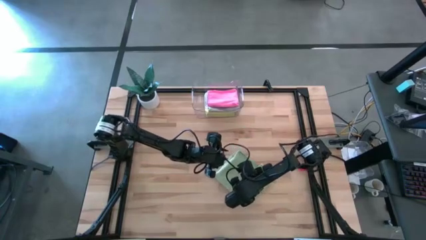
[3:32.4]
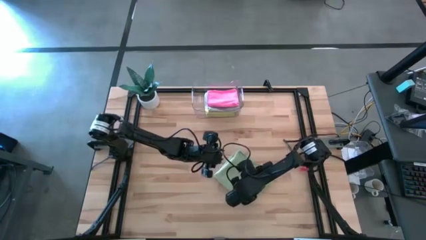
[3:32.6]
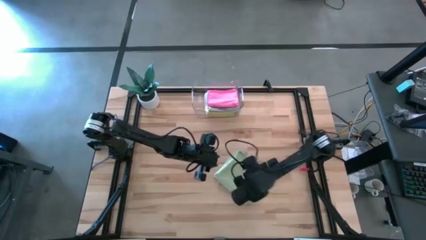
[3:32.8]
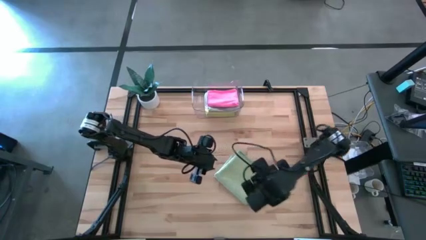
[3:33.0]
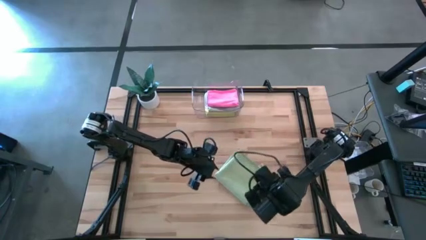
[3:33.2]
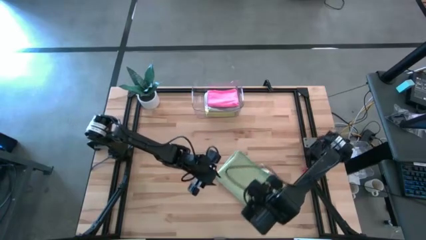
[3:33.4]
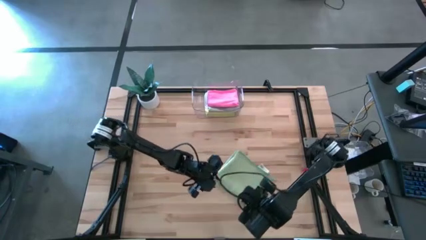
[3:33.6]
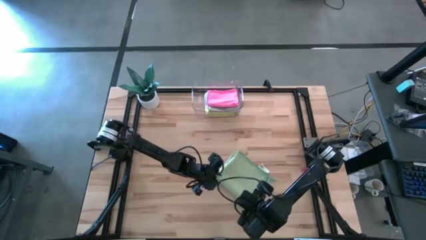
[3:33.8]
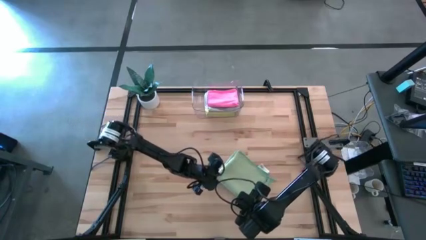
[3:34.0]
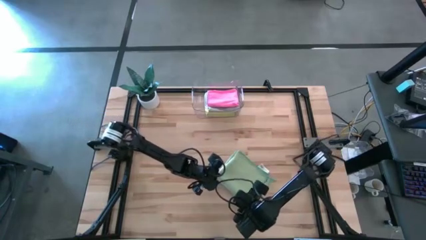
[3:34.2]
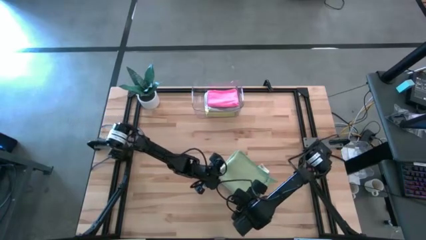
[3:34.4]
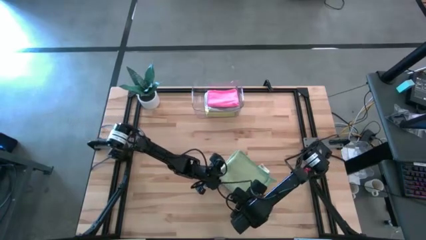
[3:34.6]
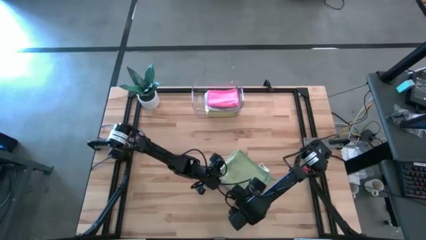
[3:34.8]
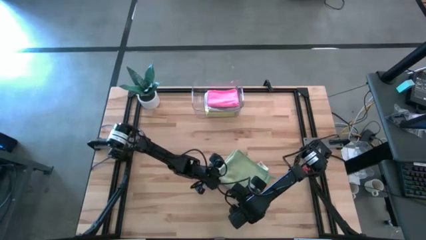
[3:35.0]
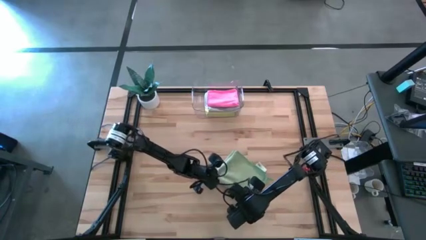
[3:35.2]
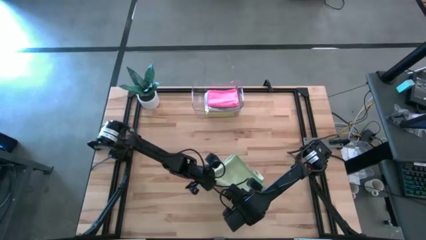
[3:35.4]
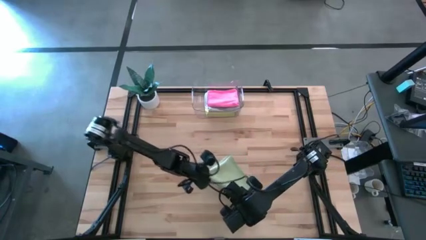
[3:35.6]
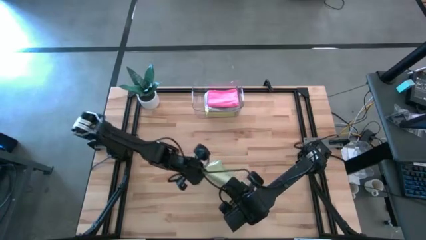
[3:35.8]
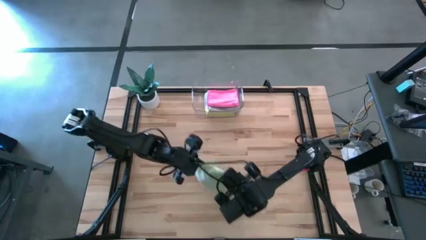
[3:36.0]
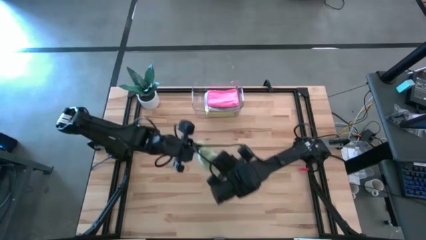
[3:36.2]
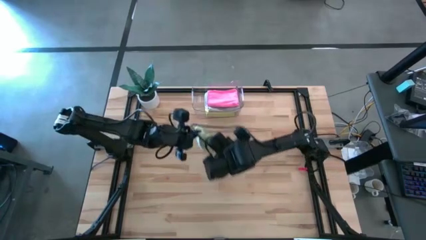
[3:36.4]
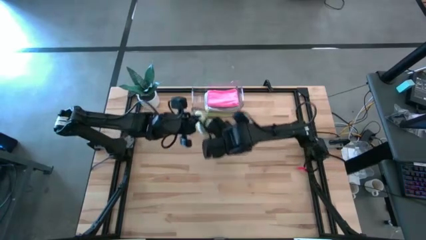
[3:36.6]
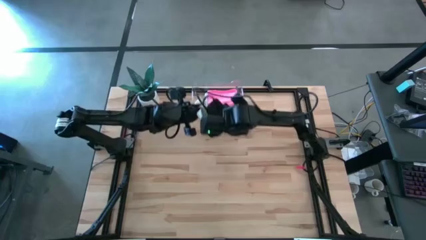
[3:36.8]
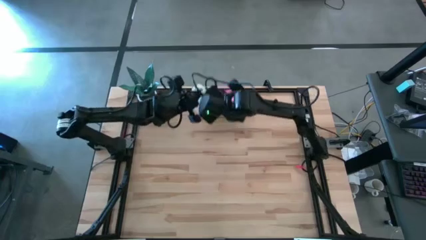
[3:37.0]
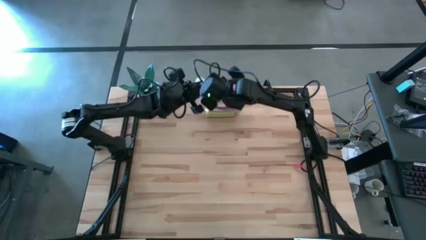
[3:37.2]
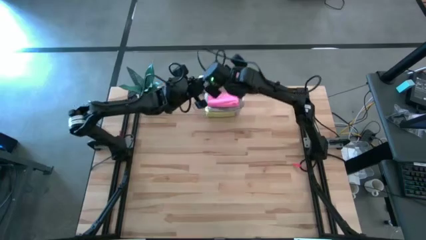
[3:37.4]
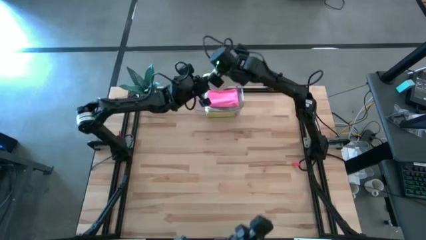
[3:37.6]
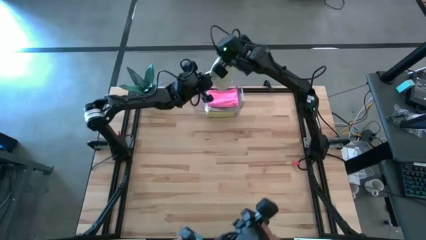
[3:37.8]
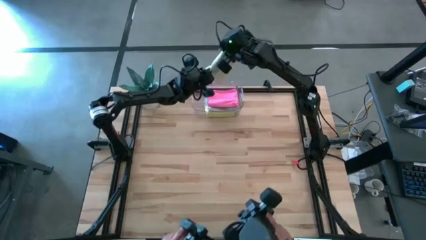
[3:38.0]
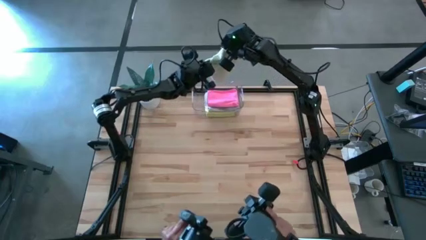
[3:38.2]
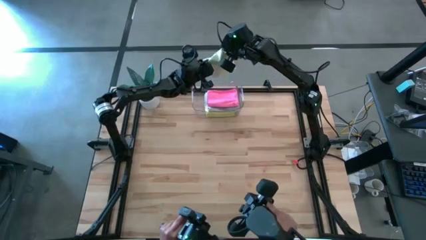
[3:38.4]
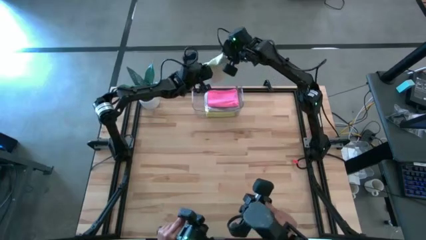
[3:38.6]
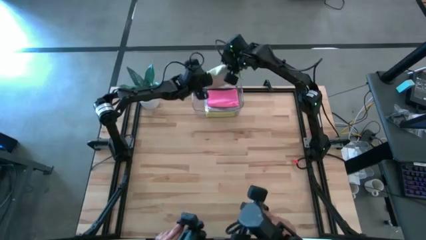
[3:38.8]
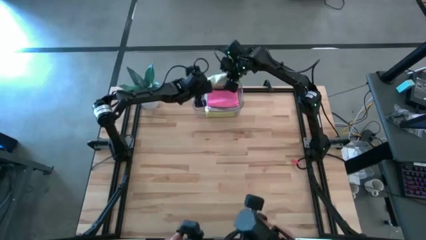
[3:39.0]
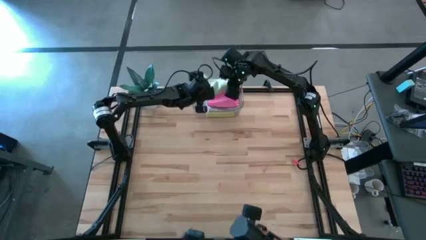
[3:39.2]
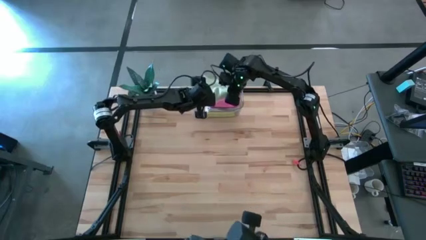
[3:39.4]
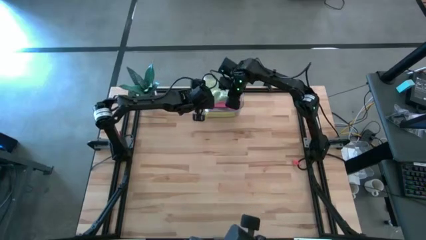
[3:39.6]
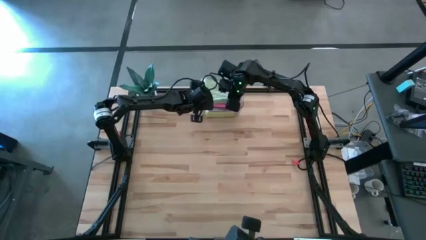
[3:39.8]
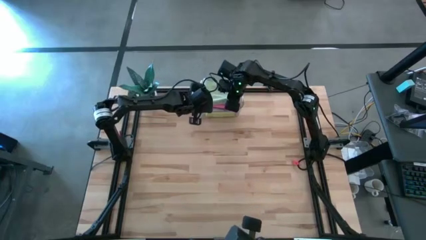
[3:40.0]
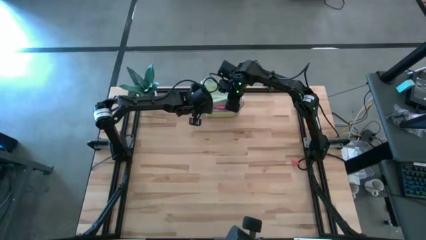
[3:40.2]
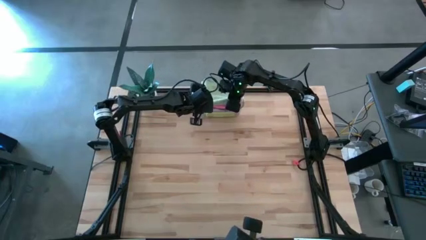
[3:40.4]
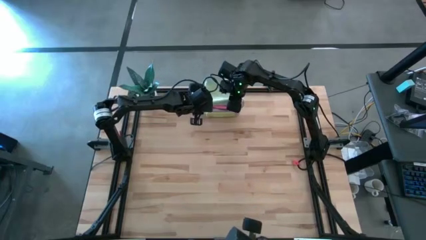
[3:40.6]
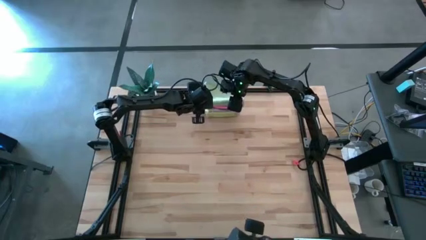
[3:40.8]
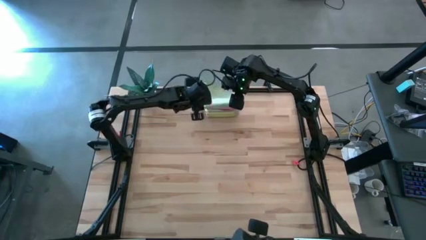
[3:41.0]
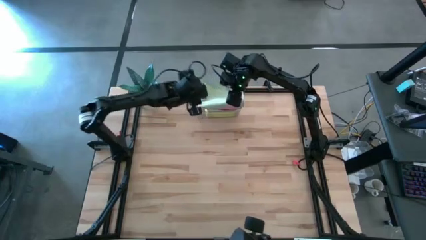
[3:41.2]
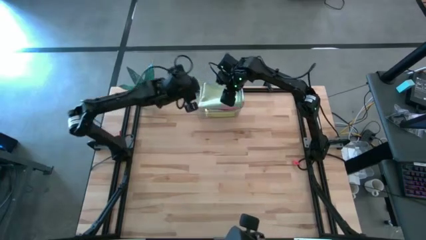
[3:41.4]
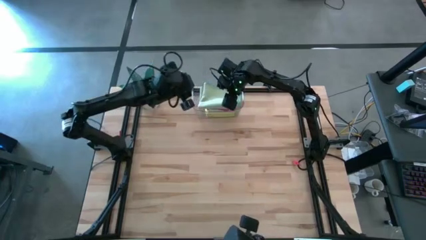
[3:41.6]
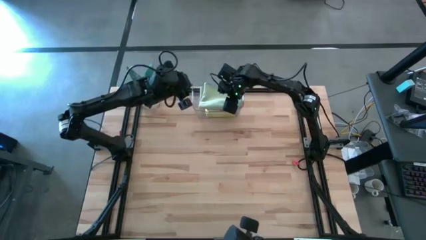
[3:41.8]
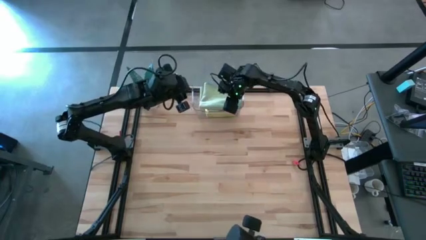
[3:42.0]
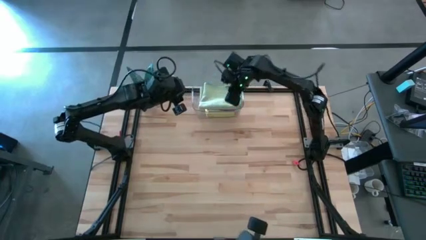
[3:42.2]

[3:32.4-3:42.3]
Task: Fold microfiber towels
Put the folded green microfiber cloth into the transparent bin

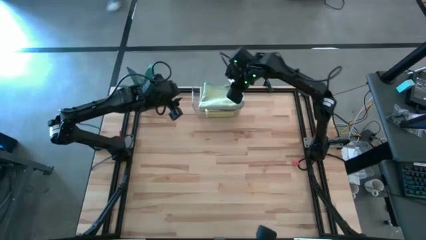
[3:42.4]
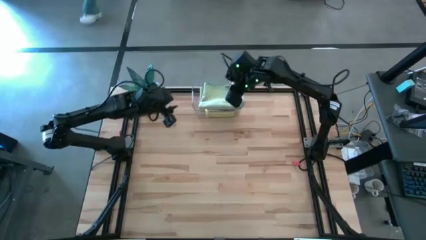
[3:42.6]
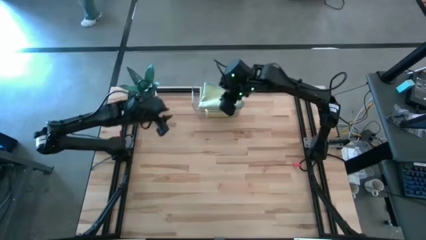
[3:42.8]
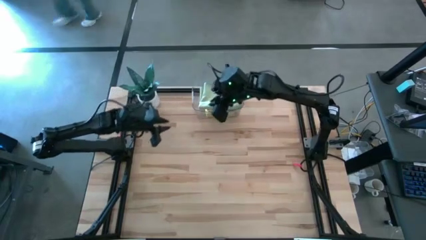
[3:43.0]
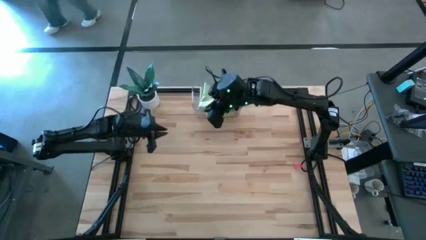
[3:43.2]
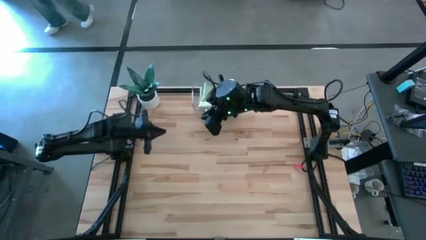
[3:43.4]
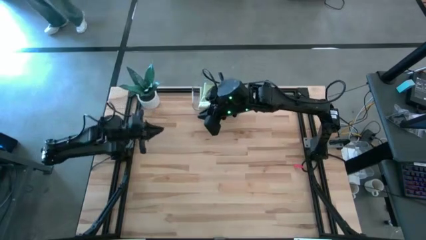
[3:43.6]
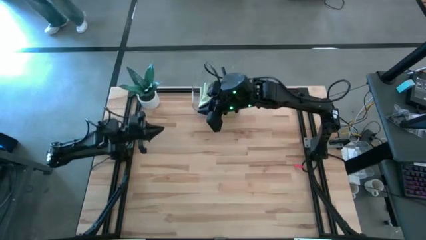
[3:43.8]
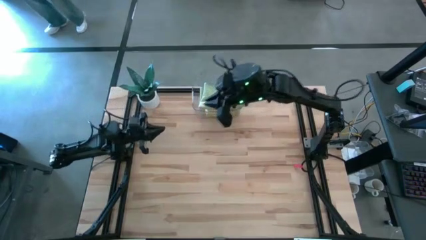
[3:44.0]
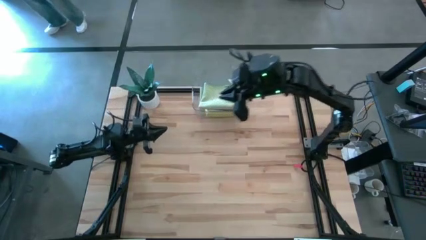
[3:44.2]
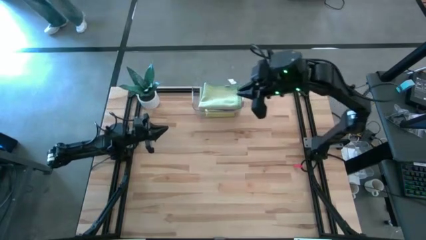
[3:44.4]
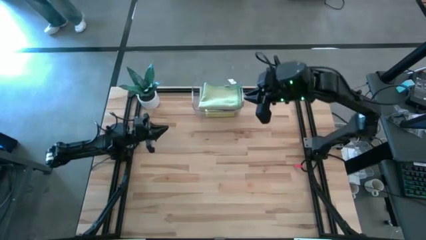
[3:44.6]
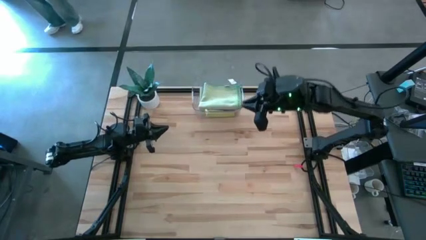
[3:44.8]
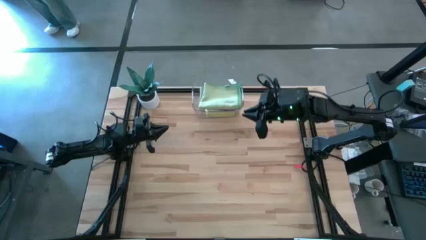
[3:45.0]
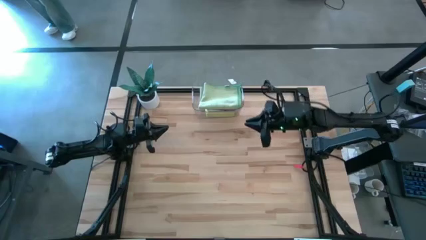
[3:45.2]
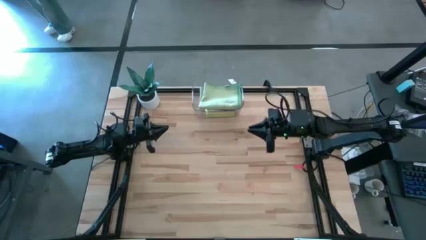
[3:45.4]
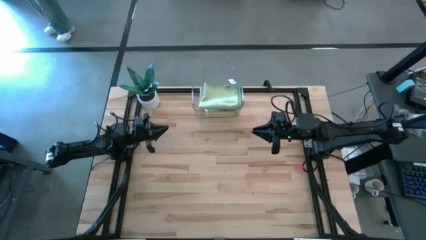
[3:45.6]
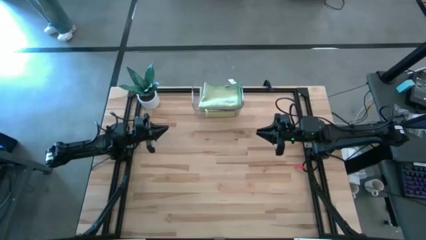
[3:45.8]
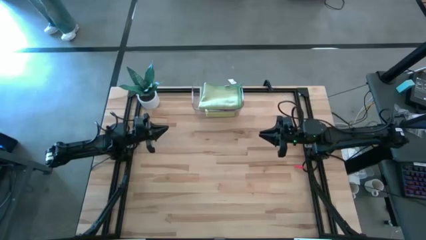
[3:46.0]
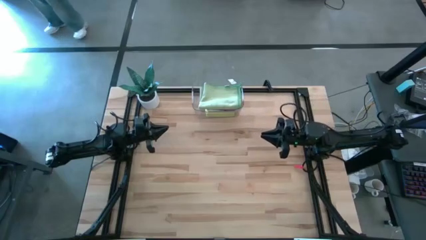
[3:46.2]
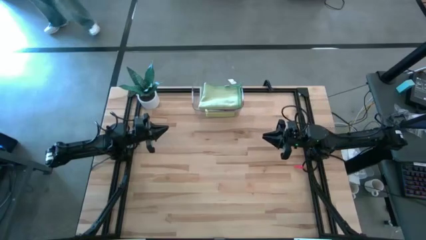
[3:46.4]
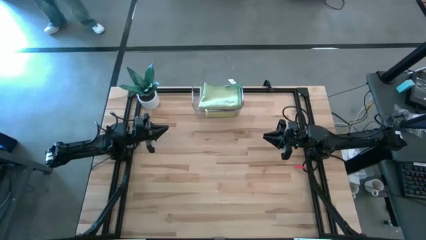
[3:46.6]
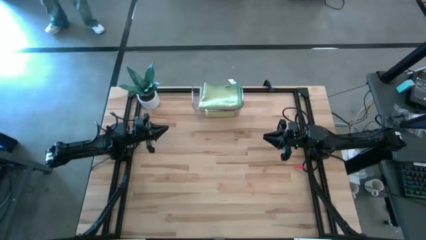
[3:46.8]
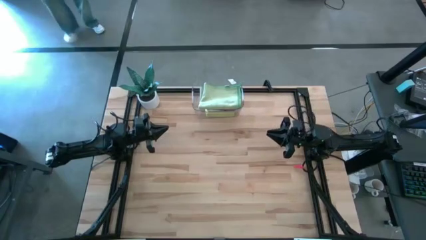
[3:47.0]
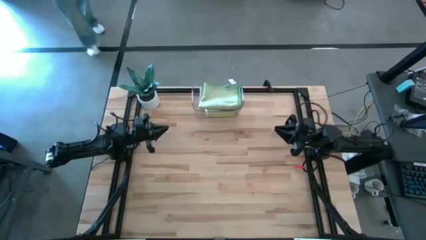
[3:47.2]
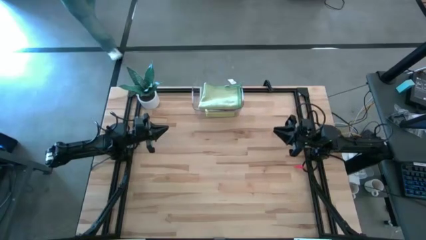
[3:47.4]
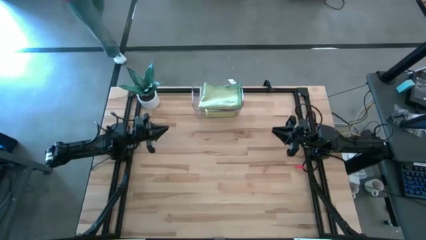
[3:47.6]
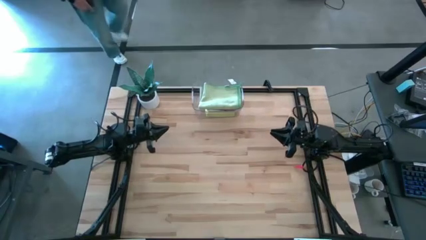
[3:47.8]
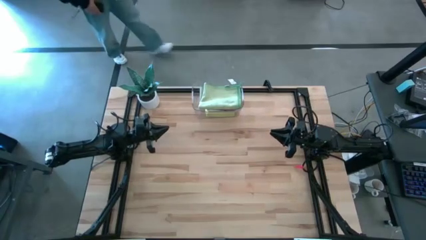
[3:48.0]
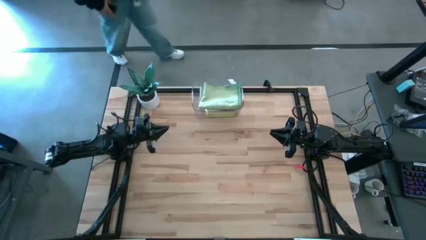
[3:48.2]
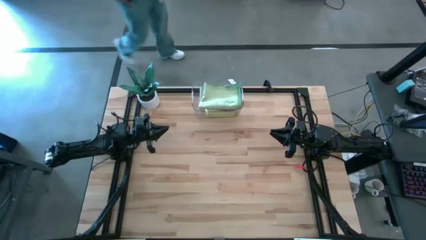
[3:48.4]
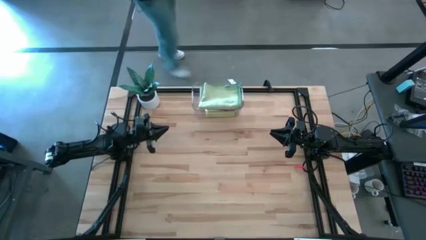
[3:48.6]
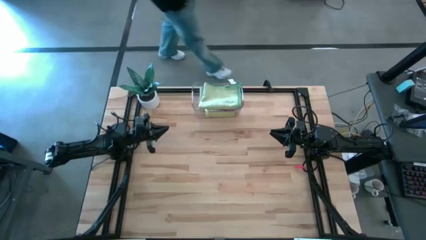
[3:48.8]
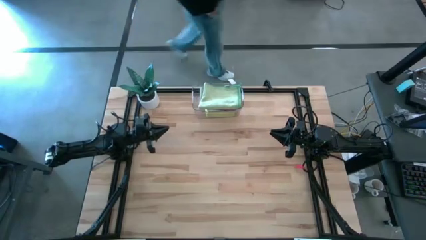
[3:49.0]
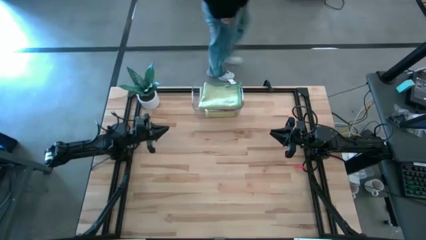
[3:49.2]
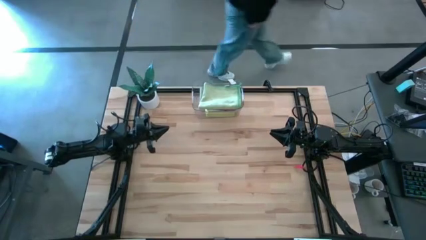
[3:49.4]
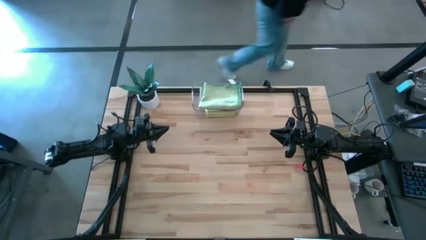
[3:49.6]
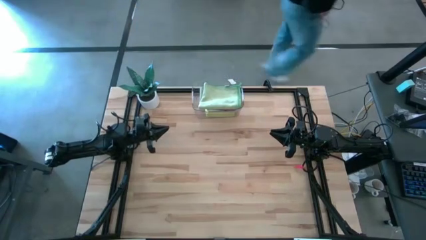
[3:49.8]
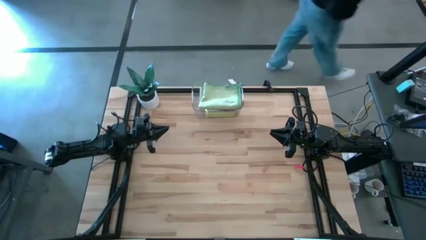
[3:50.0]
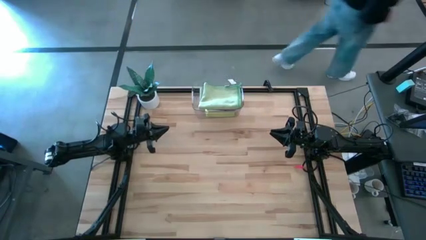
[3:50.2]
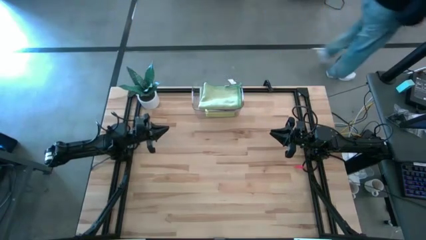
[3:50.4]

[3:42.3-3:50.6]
Return to Home Position
